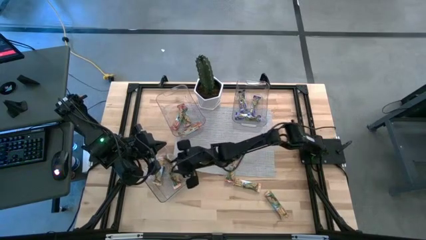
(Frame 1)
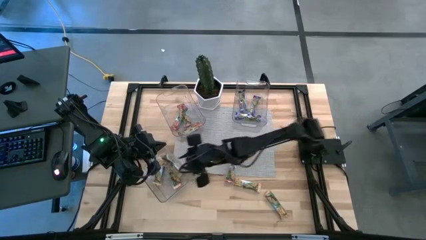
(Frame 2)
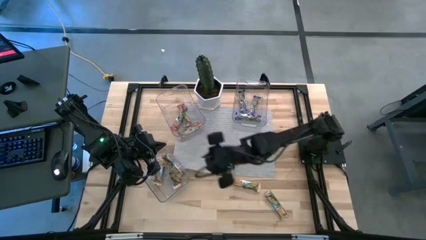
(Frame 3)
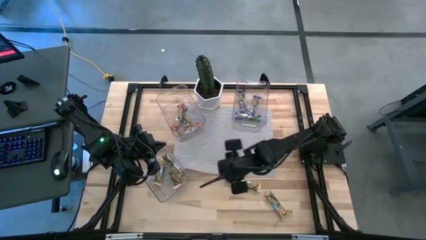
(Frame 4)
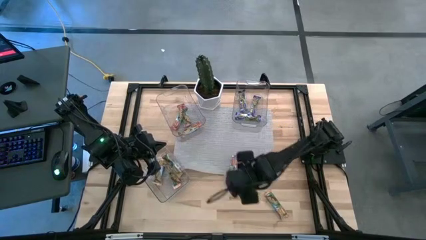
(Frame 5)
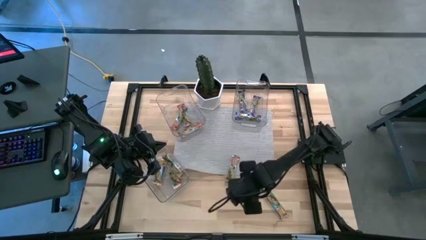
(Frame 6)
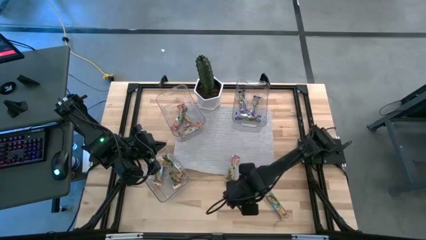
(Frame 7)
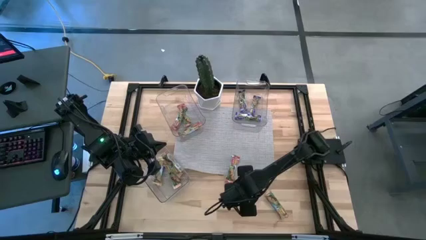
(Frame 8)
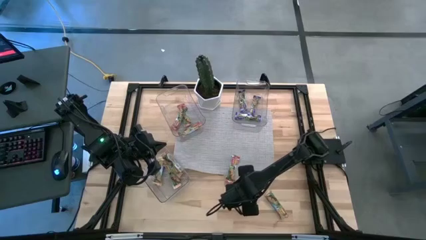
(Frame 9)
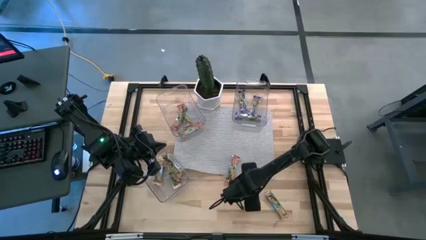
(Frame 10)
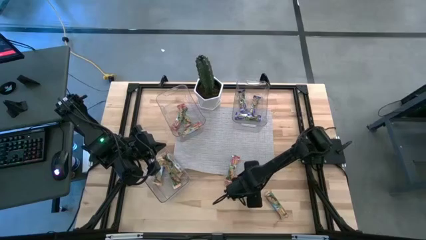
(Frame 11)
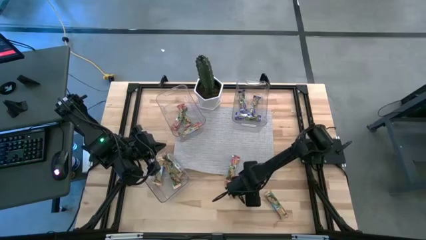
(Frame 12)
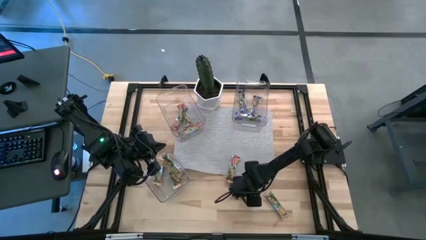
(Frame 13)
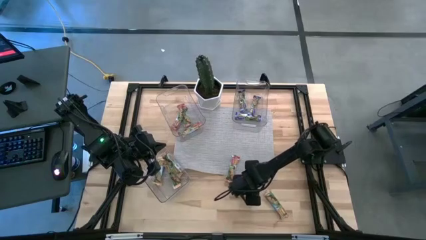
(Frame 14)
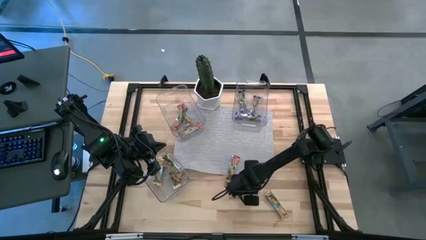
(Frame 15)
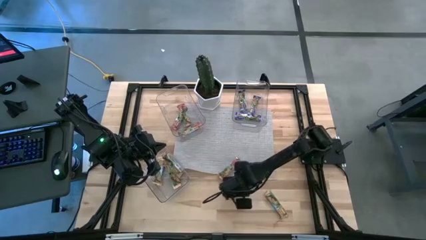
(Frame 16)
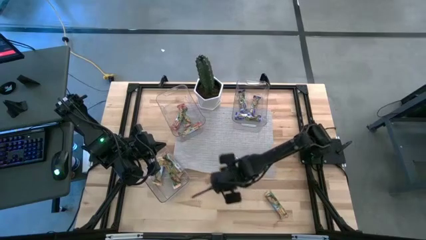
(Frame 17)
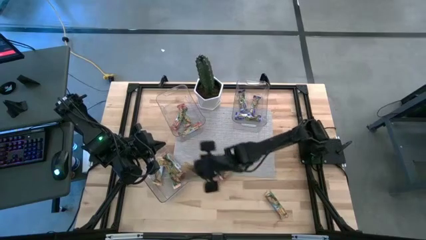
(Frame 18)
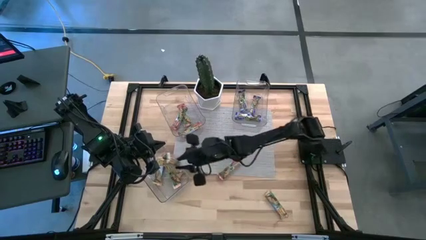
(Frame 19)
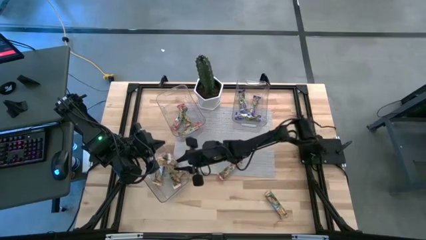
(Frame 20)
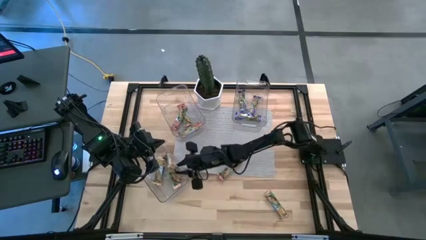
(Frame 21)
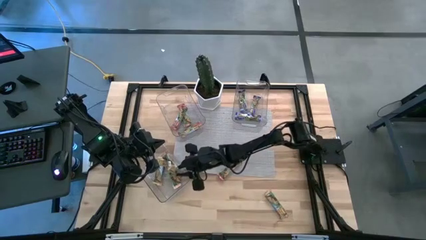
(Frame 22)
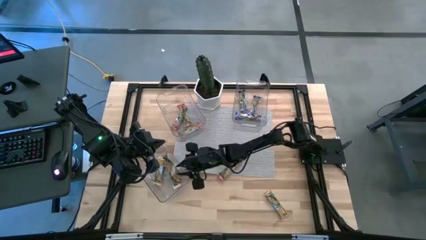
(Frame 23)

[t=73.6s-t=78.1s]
Task: Pick and place Granola Bars by type
Put the yellow granola bar into the bottom transparent bin

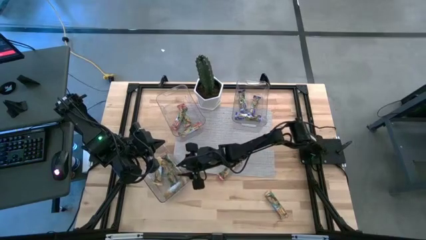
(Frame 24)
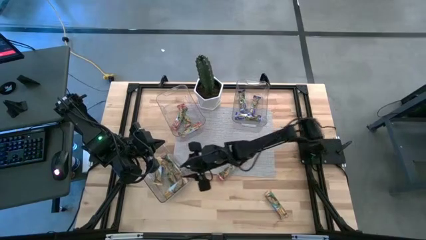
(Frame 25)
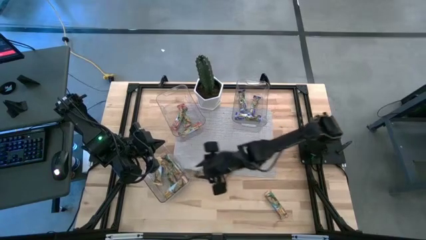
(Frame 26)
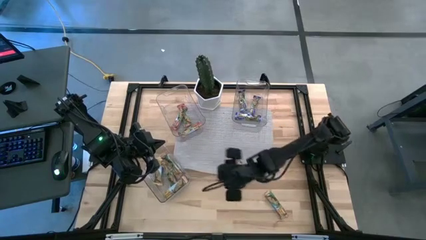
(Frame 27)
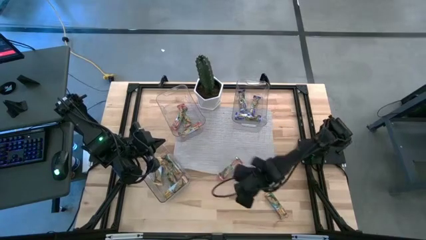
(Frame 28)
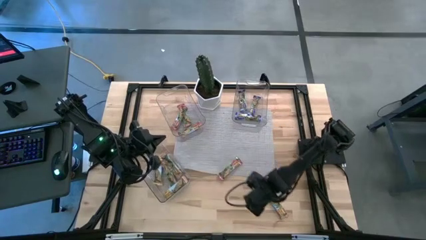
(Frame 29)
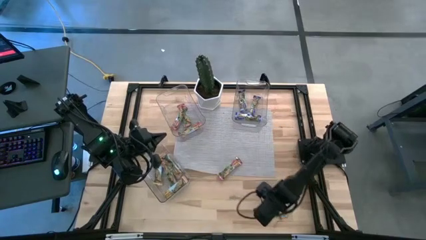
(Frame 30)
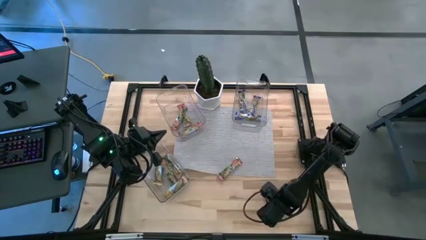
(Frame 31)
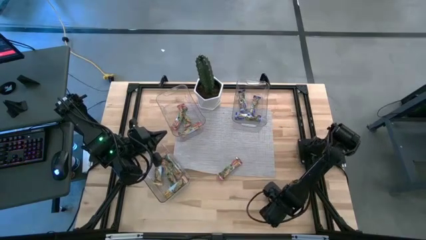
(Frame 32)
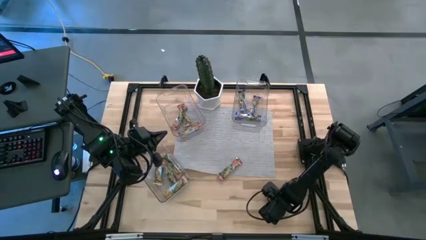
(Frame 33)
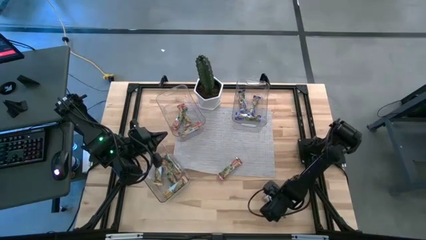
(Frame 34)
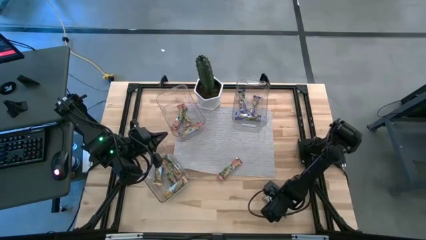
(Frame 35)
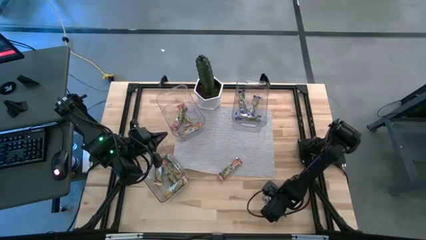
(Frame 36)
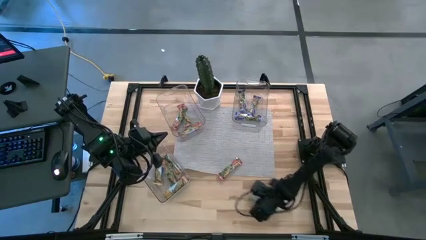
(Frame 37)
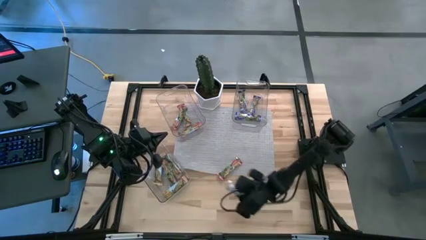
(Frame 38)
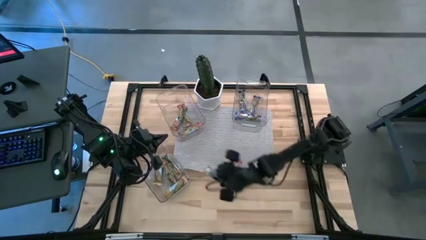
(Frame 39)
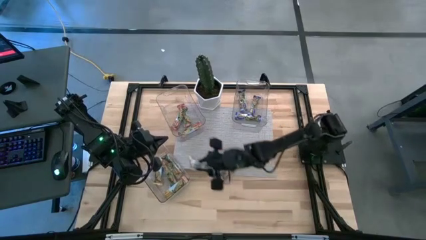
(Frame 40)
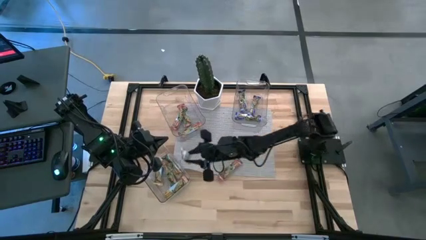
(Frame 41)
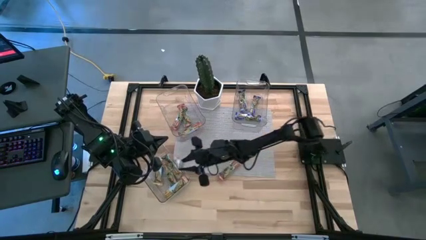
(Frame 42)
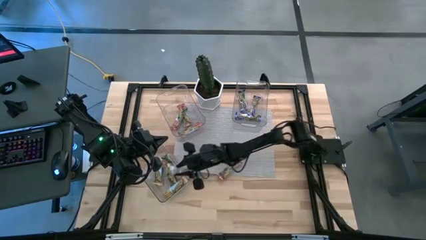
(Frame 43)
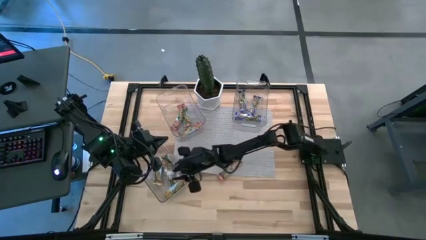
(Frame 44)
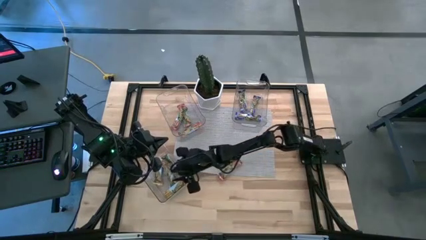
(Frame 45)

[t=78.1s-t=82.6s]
Put the yellow granola bar into the bottom transparent bin

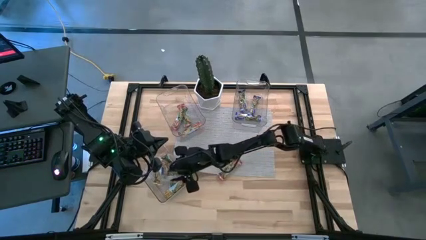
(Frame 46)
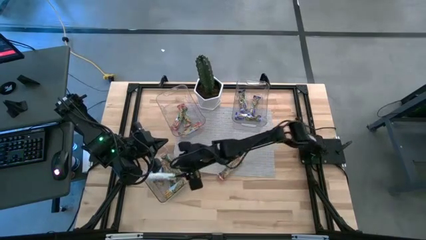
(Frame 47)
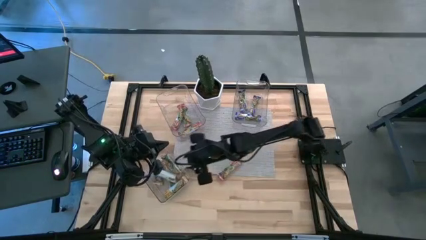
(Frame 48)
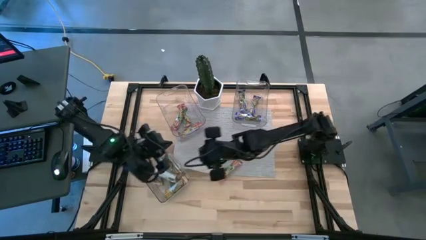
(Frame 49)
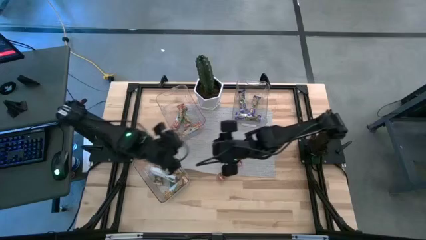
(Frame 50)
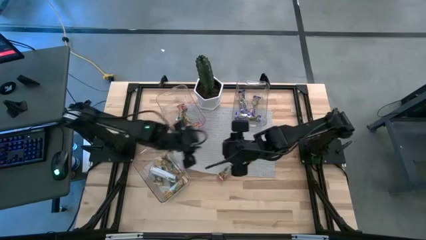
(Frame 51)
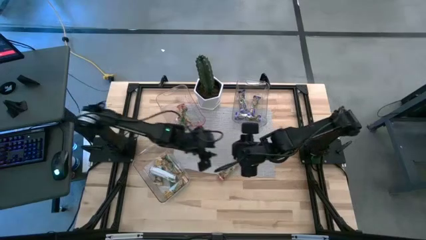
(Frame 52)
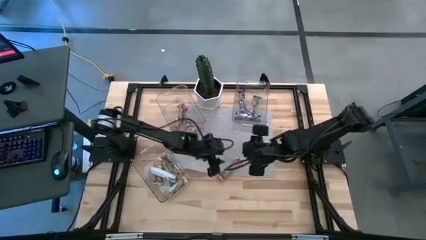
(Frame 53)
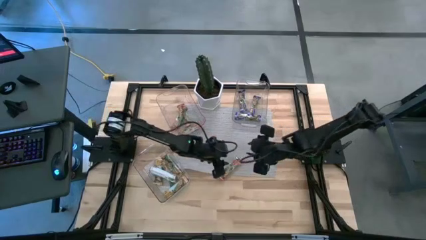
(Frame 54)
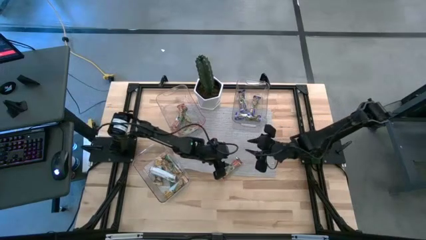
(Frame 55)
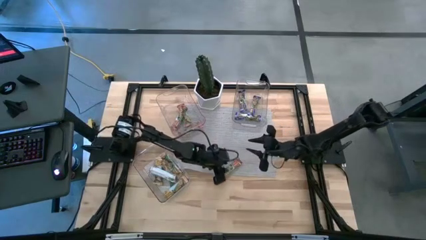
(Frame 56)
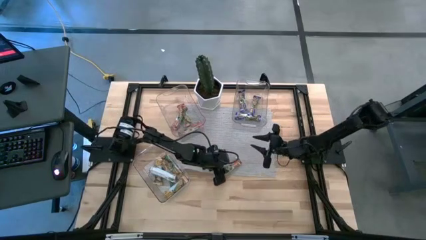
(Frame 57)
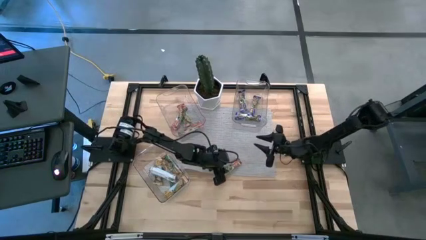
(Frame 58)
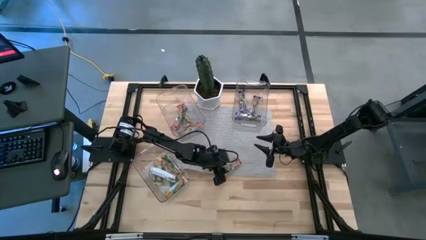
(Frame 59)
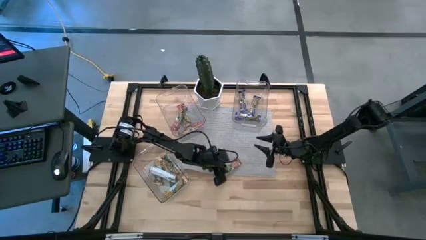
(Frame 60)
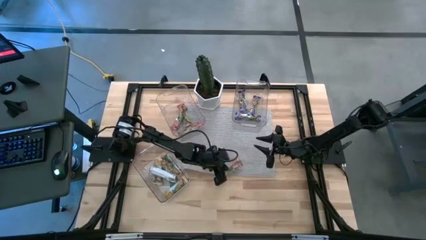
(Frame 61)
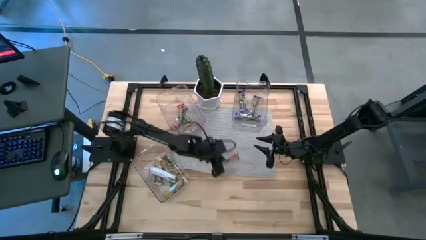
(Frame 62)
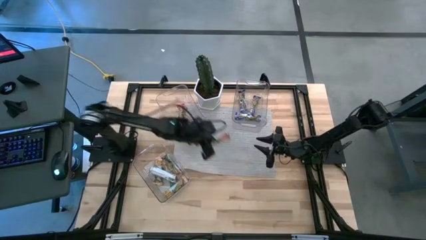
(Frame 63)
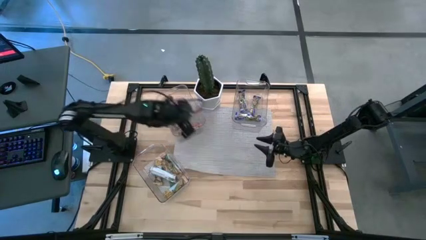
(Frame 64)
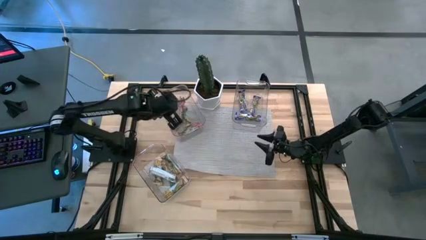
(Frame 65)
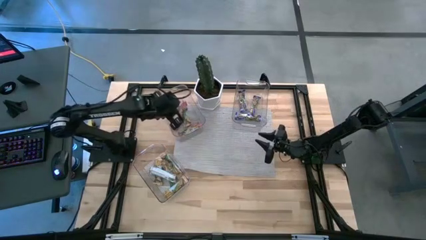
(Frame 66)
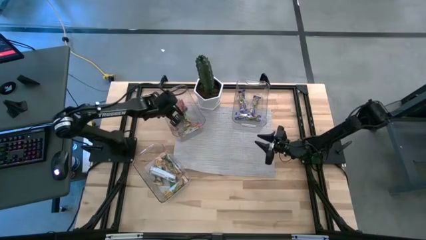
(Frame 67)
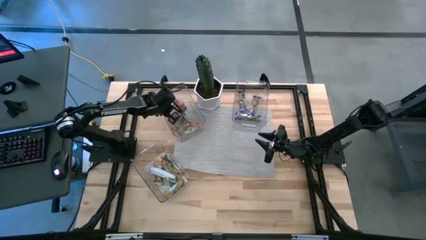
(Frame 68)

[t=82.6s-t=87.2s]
Put the red granola bar into the top left transparent bin

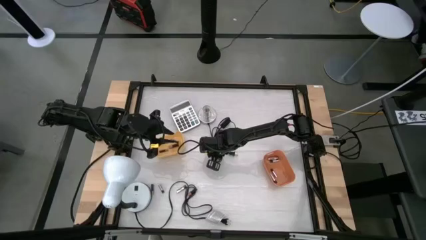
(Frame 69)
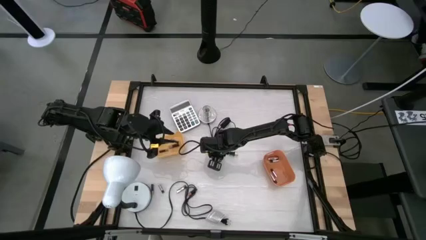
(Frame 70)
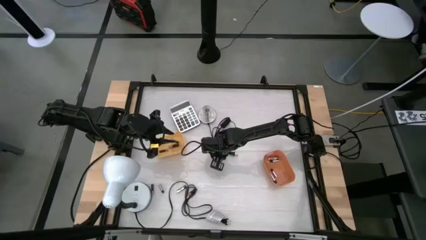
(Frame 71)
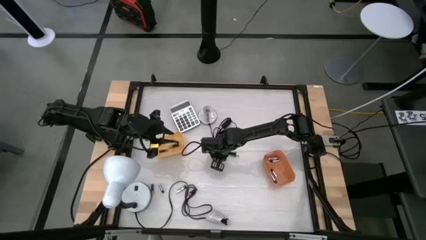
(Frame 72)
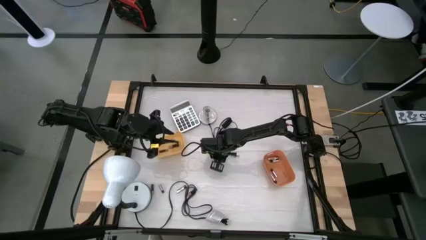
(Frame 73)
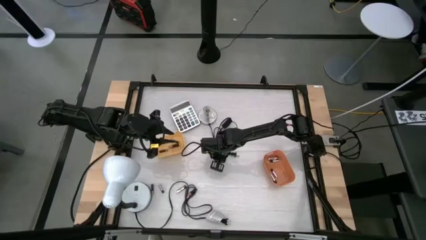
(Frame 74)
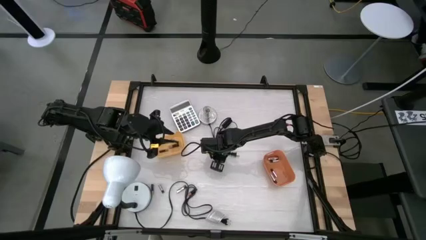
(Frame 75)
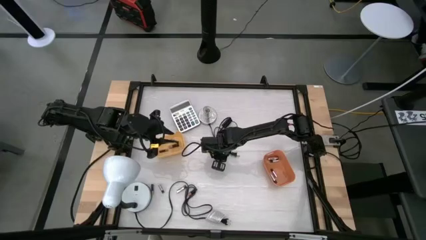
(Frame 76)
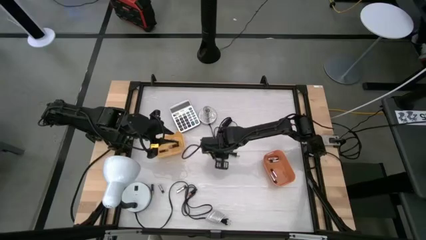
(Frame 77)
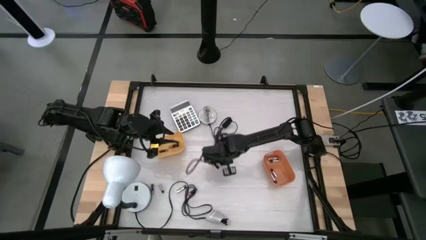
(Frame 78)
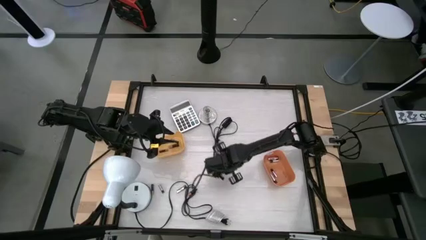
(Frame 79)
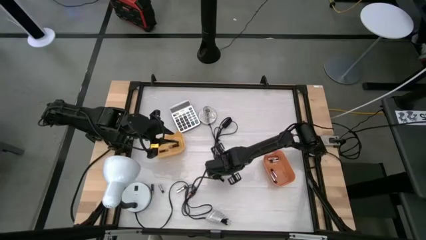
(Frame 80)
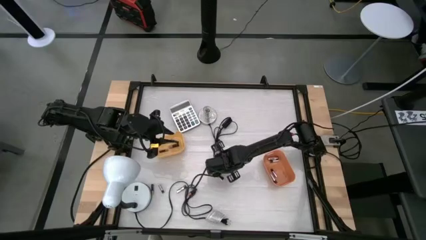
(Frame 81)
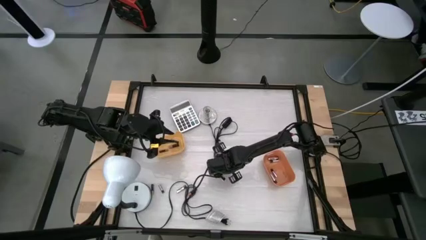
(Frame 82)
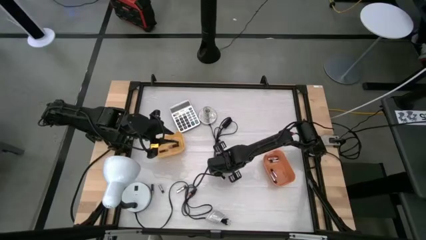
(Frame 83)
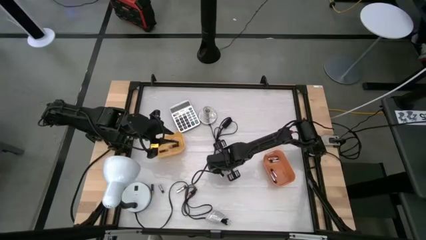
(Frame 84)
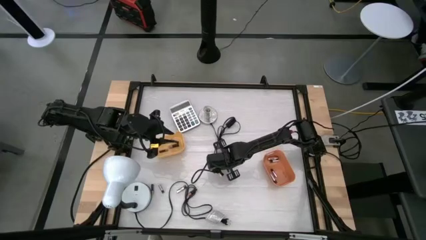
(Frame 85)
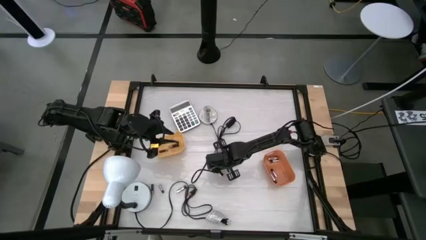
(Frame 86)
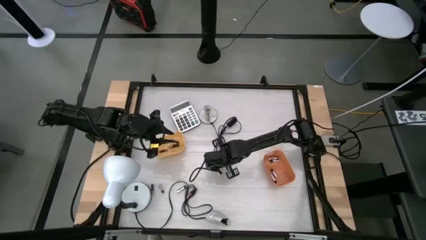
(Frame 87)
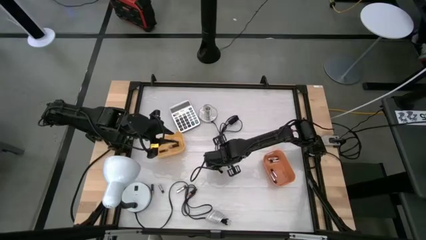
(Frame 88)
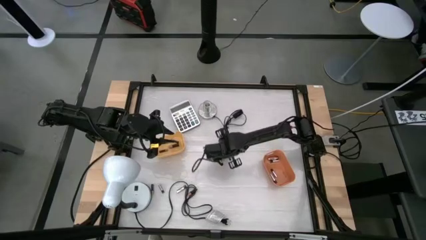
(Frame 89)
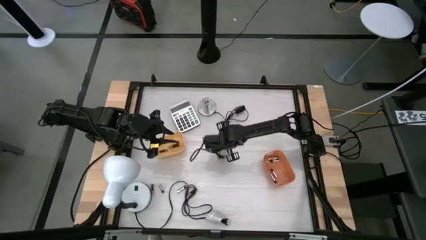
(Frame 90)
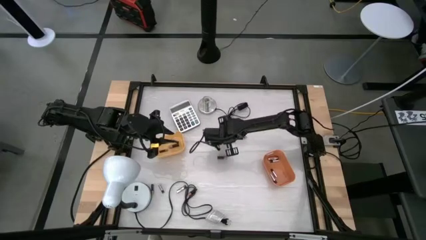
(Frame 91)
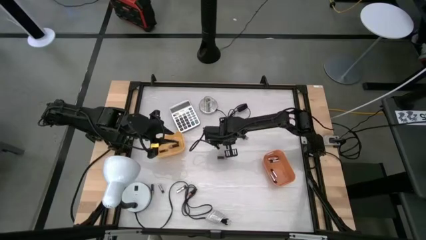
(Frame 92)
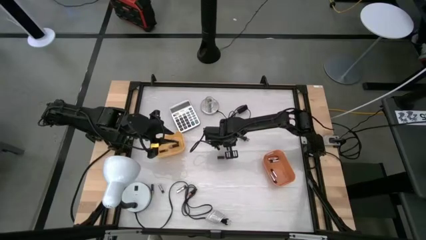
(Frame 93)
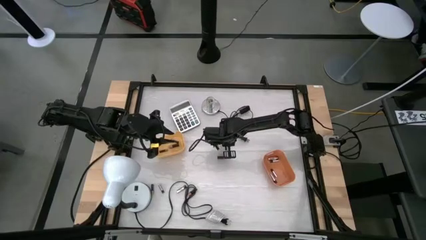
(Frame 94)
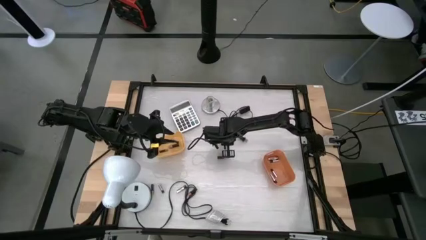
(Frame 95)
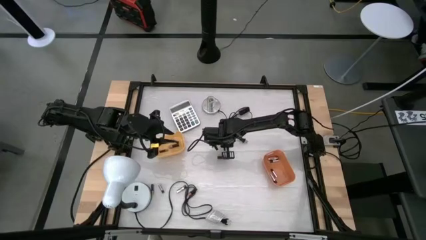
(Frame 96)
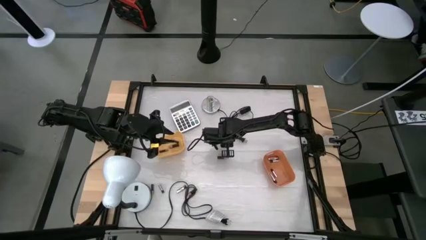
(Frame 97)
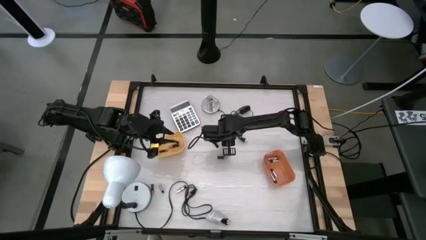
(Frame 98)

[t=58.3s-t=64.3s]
Task: Sort batteries
Move the wire to the top of the table
